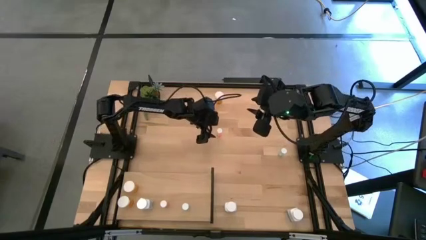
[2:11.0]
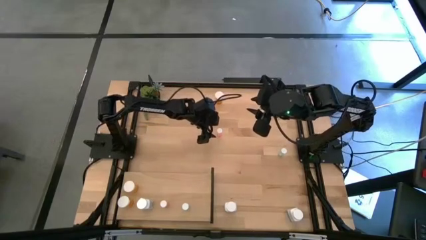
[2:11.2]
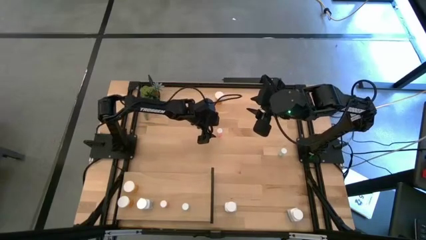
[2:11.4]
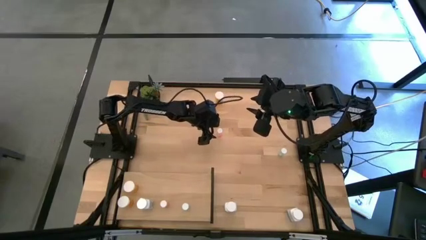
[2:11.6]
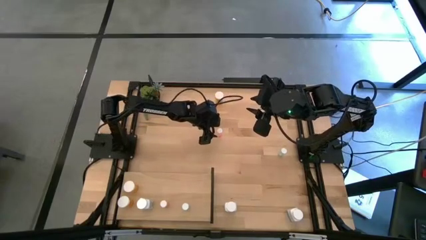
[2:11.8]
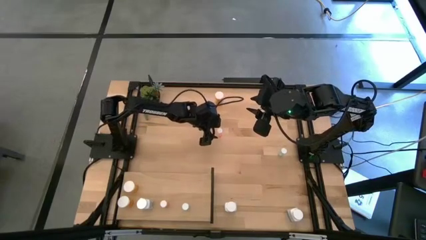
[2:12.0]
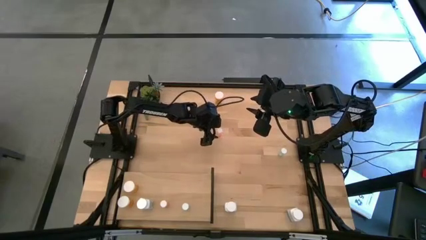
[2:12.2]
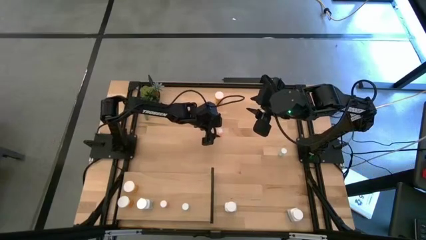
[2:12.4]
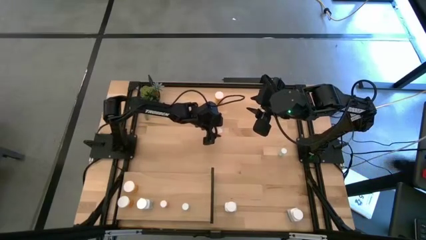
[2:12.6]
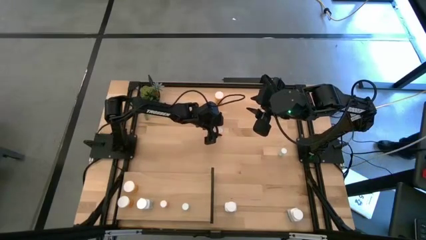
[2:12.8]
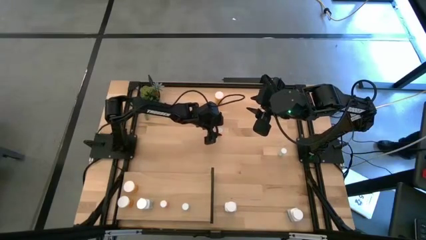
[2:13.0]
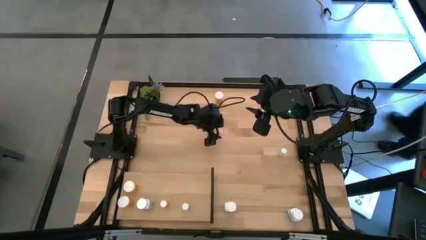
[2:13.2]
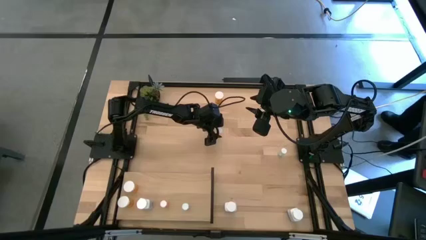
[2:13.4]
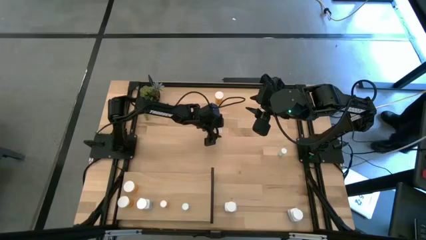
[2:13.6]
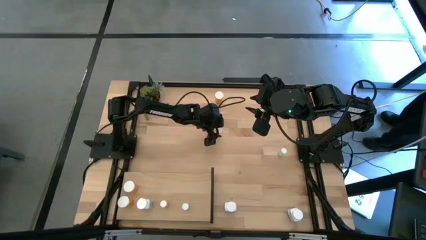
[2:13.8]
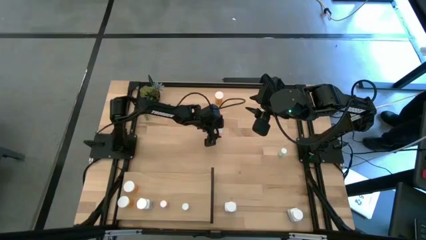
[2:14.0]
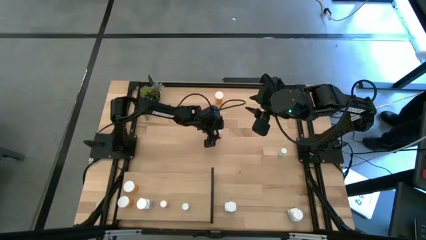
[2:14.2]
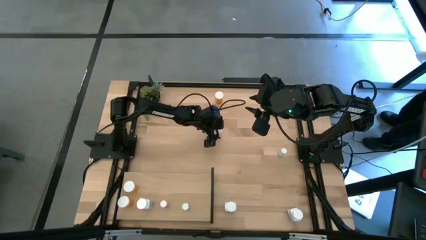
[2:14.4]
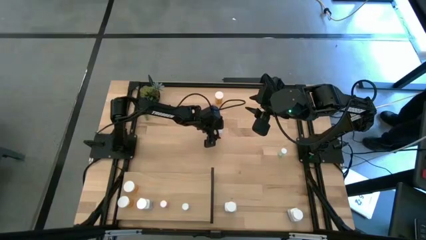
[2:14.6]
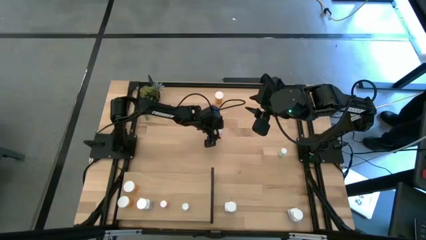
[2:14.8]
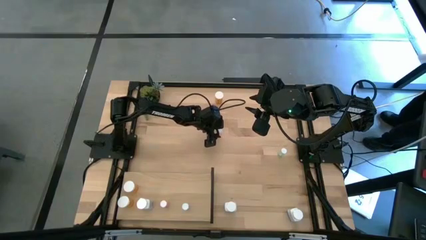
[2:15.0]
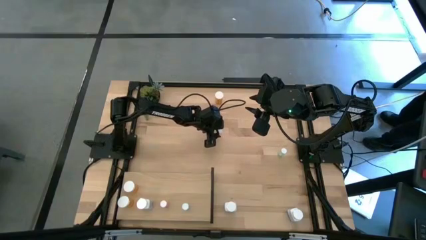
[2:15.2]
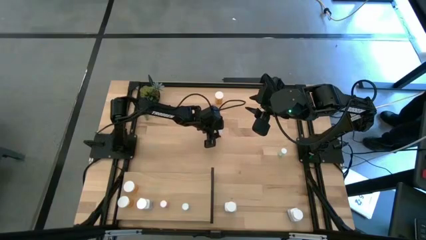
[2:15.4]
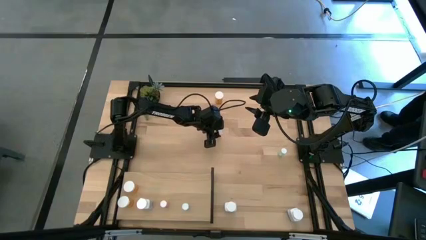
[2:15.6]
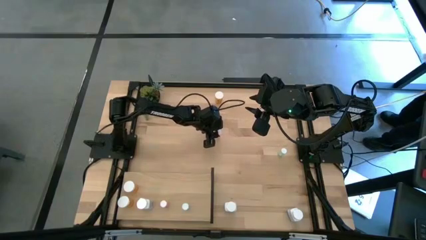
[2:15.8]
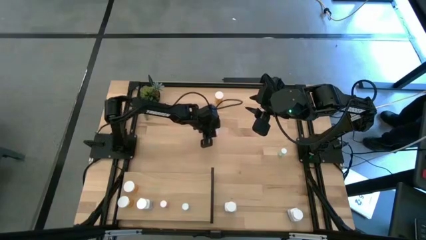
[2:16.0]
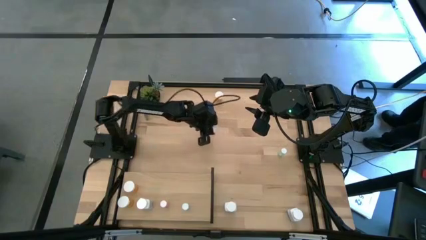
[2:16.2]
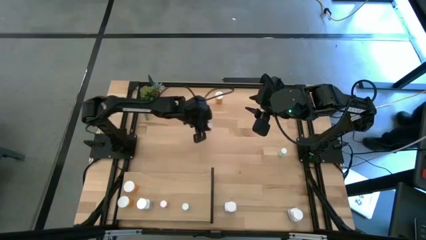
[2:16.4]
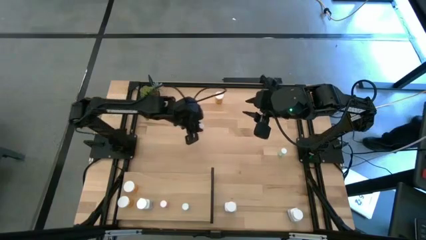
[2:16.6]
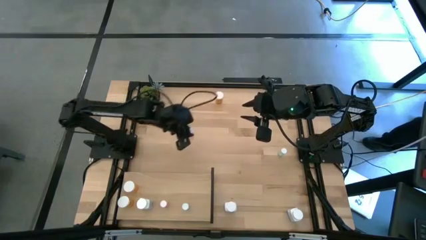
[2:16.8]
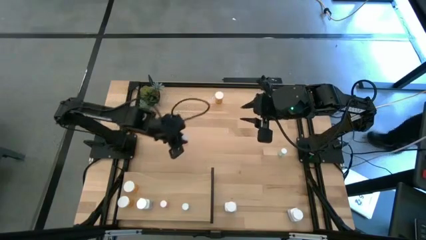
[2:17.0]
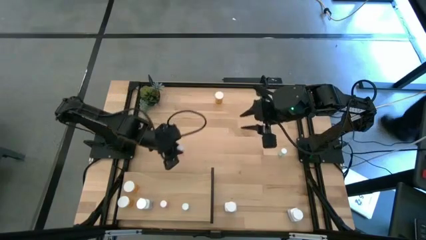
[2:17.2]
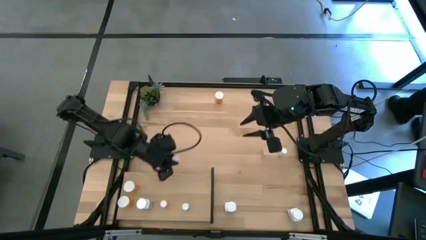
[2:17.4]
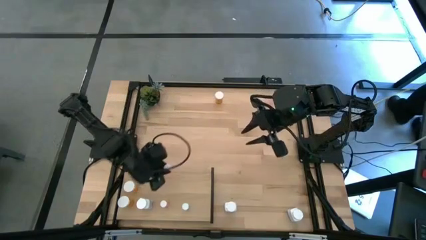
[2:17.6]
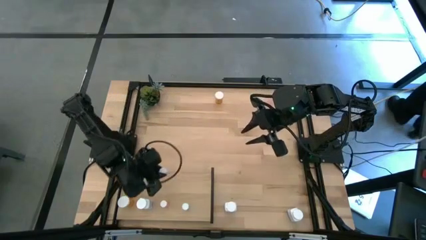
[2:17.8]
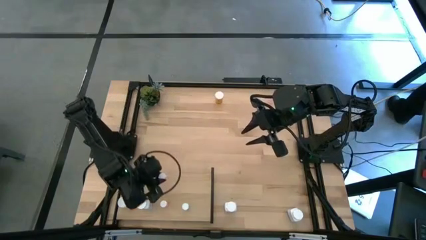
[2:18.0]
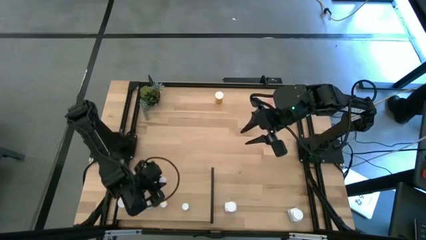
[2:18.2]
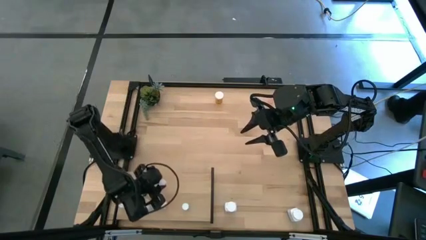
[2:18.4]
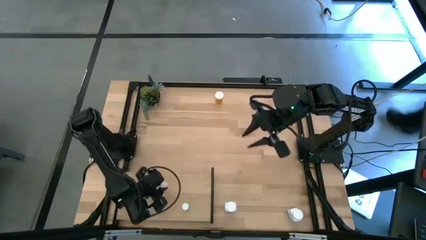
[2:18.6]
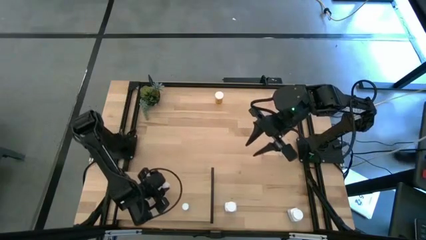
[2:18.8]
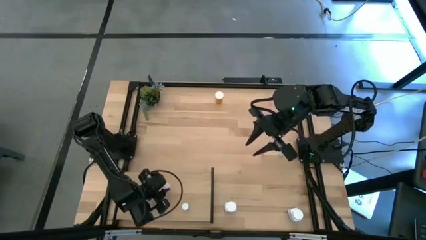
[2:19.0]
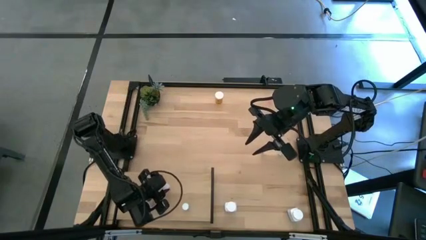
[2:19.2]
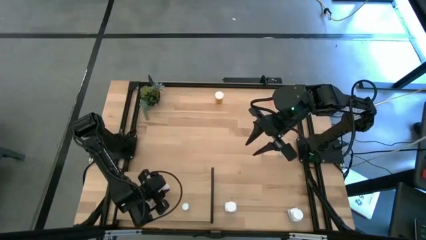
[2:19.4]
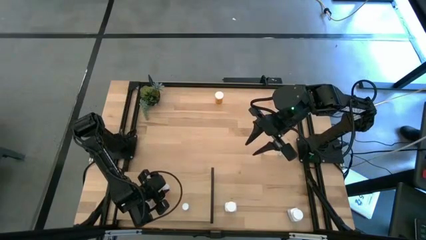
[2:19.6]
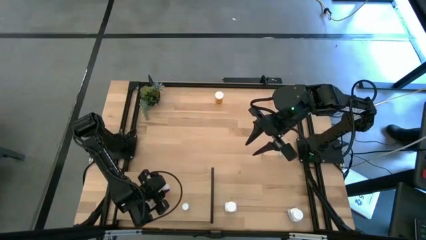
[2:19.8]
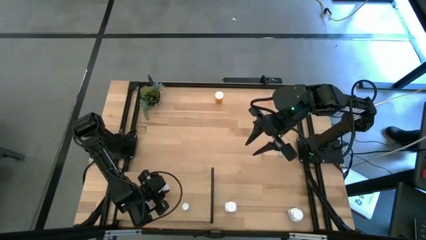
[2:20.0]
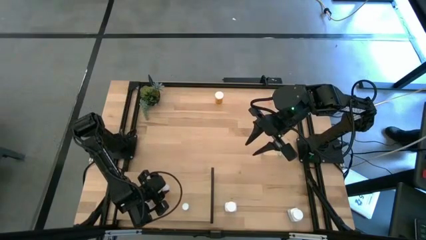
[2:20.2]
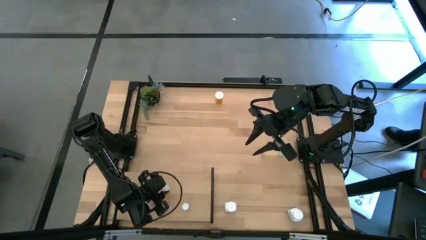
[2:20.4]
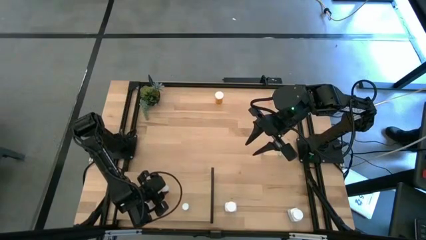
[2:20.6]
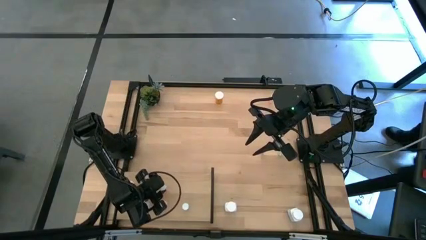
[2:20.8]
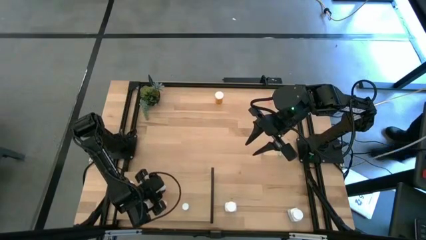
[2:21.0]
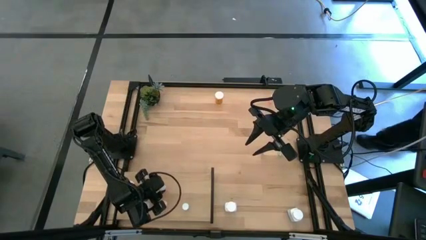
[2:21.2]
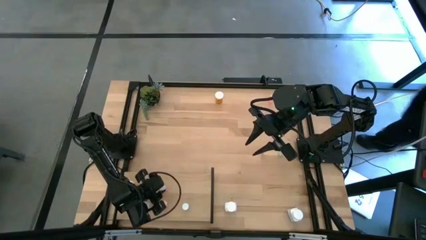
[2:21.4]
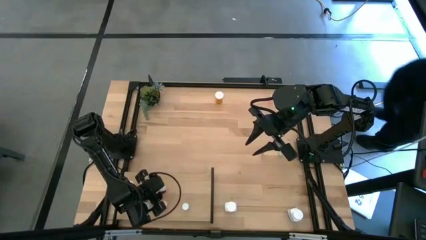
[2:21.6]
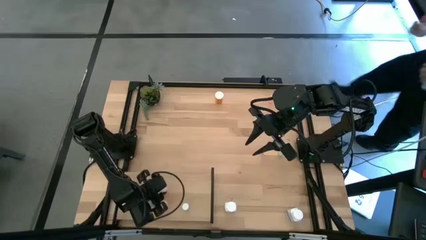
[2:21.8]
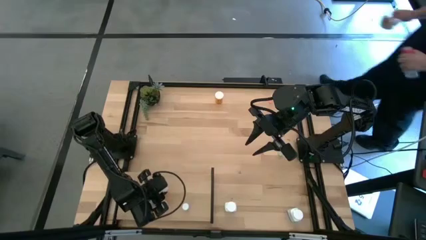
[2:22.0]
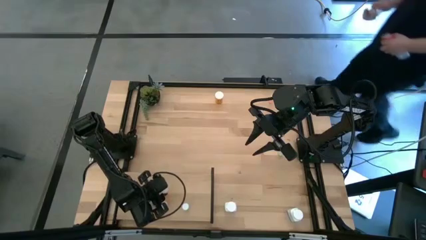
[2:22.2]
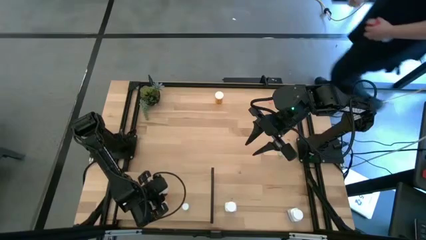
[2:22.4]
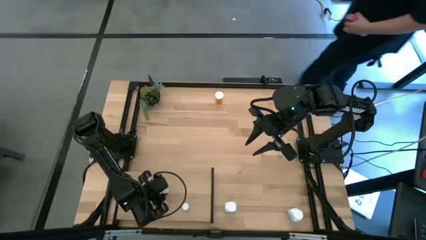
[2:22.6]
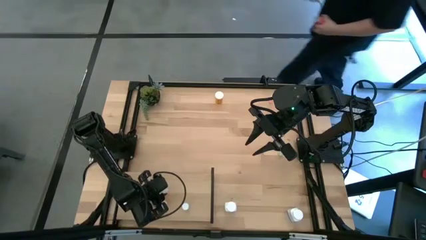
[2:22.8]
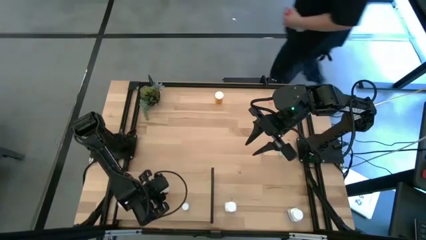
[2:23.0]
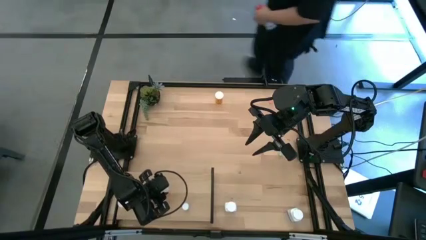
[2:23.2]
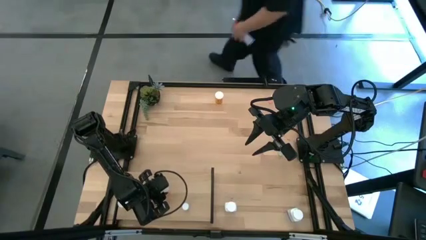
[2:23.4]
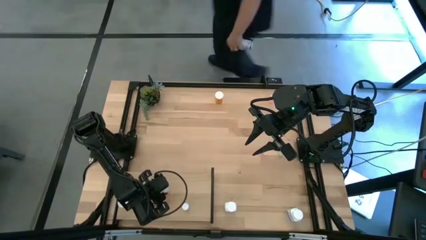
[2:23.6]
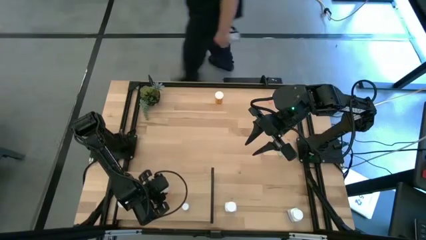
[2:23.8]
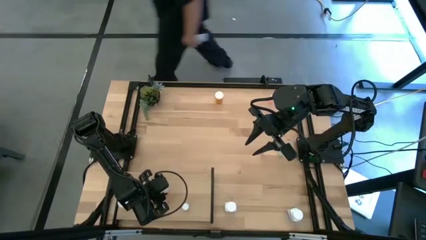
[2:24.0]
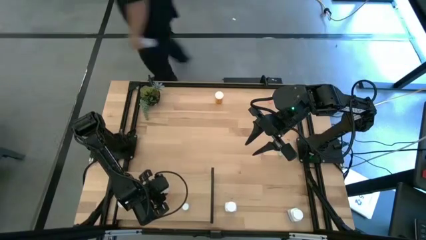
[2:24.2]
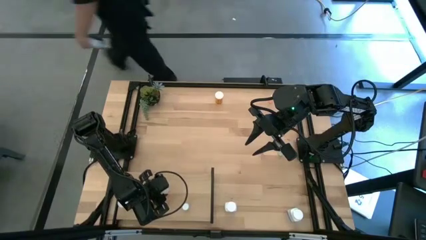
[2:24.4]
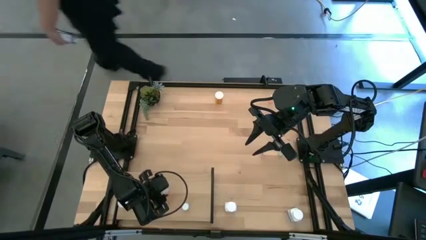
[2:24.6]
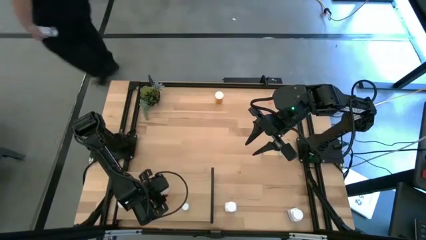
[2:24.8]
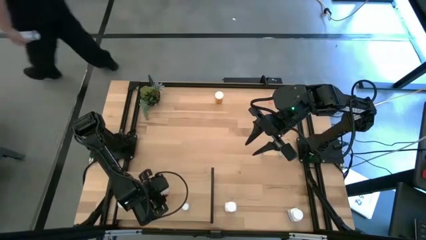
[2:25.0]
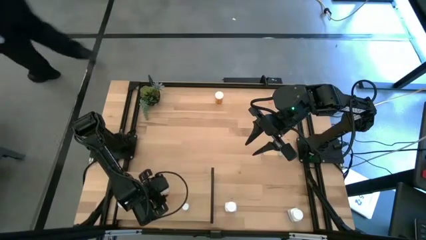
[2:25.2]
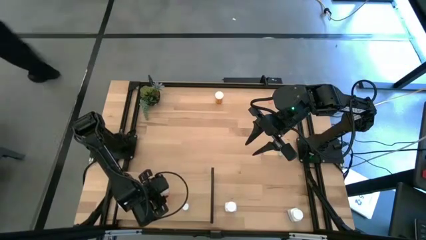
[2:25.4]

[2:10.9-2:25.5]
Task: Pick and place medicine bottles onto shelf by color
Put the bottom small red pill bottle on the shelf aligned with the other small red pill bottle
